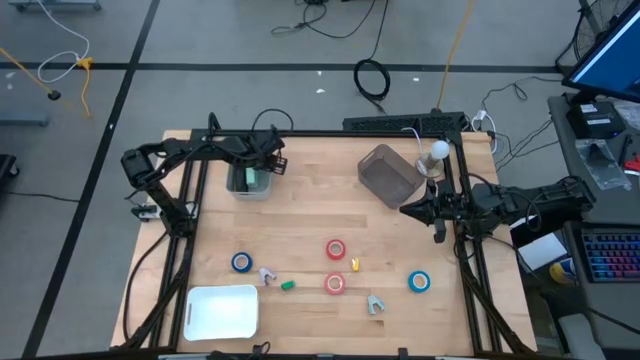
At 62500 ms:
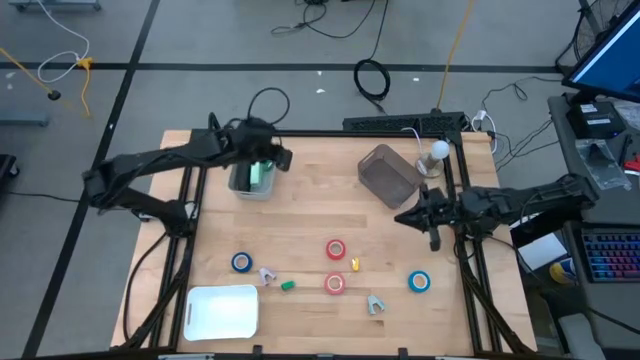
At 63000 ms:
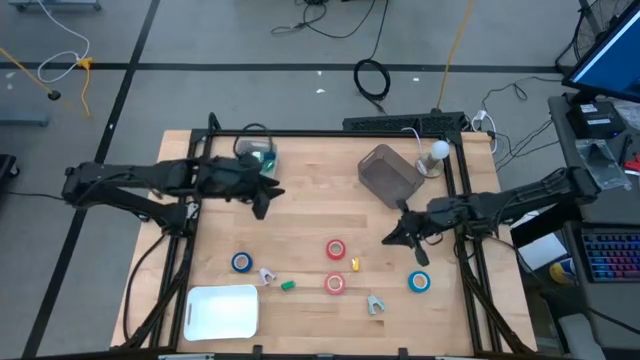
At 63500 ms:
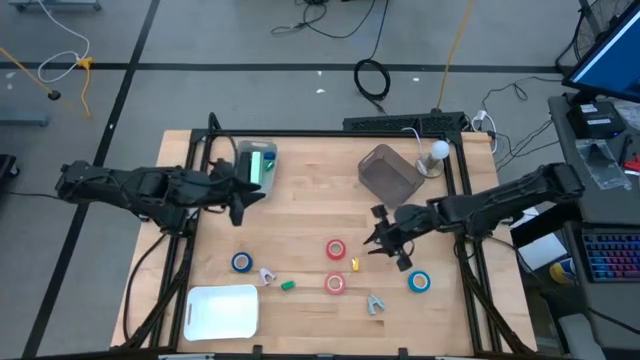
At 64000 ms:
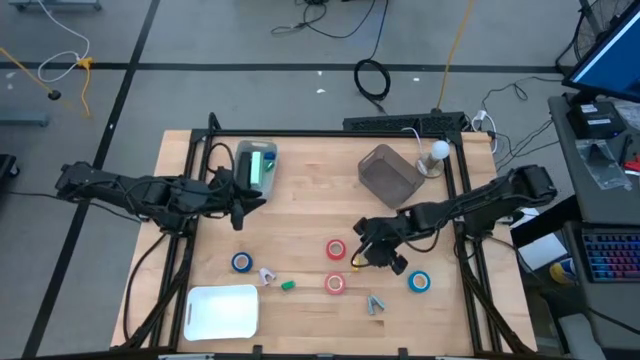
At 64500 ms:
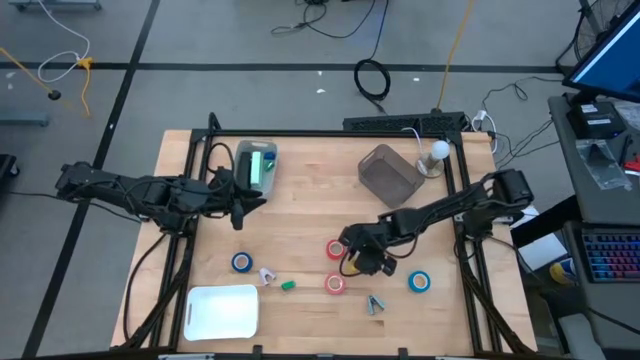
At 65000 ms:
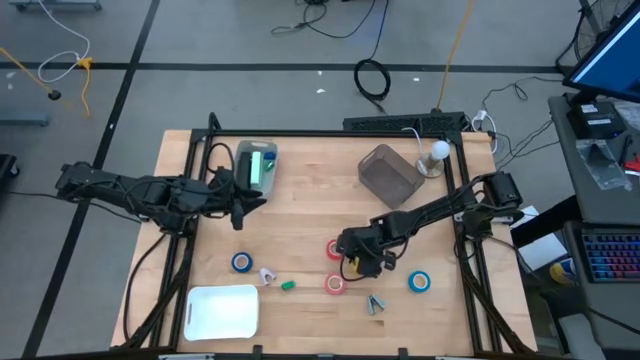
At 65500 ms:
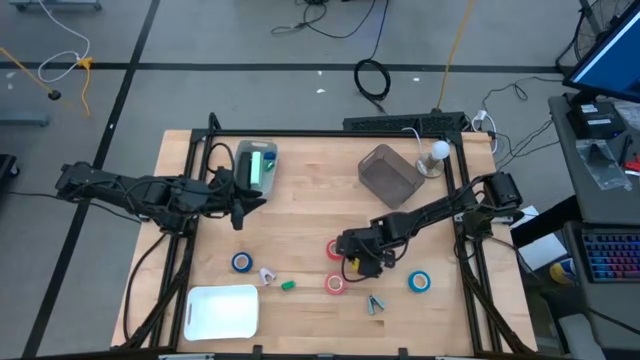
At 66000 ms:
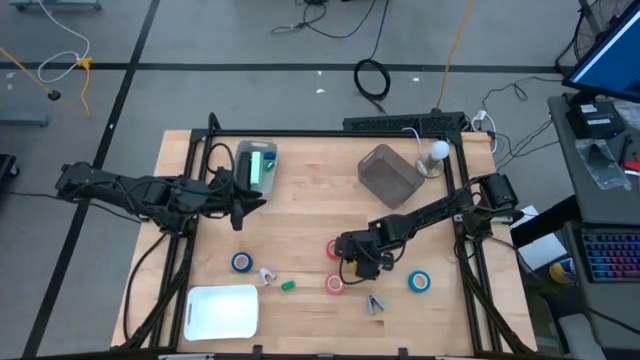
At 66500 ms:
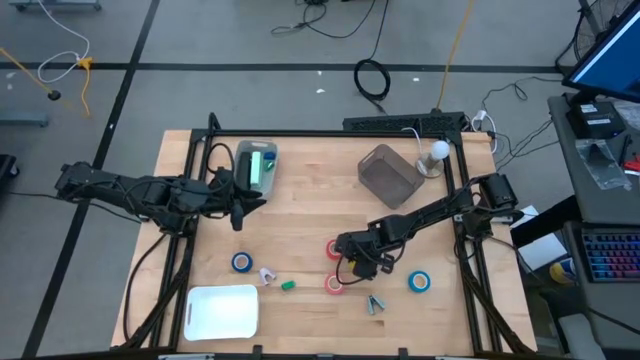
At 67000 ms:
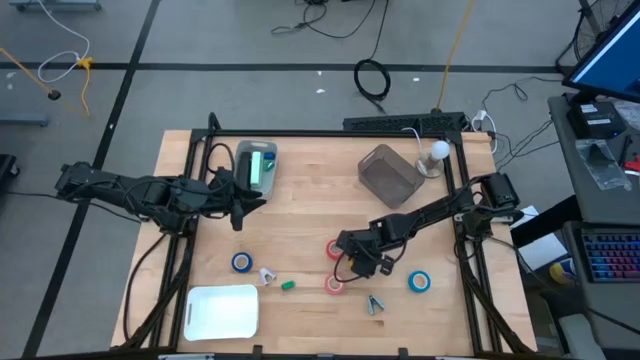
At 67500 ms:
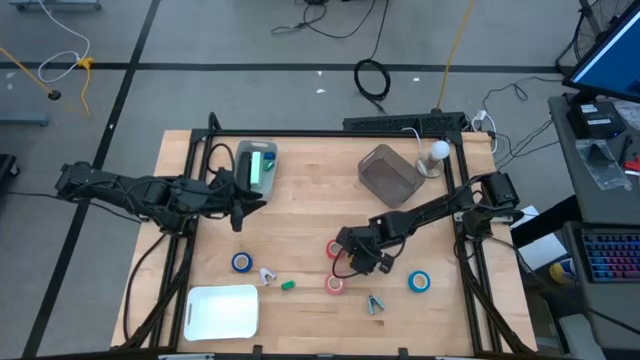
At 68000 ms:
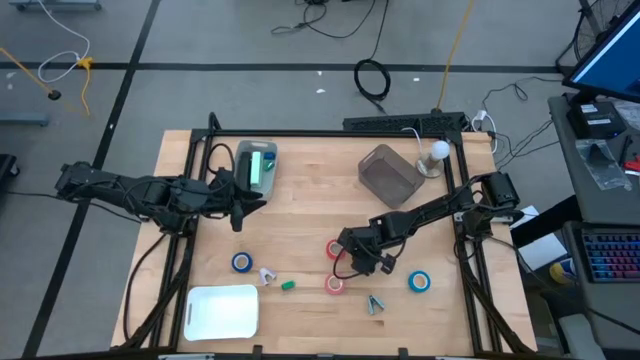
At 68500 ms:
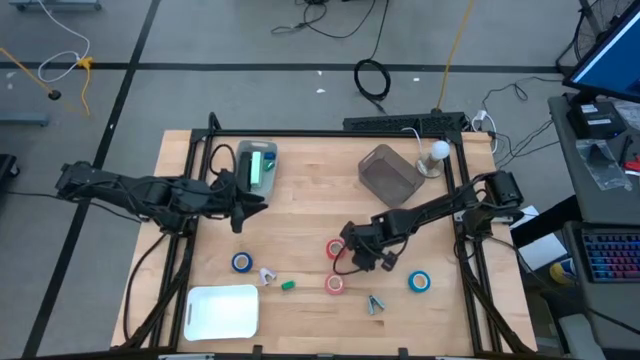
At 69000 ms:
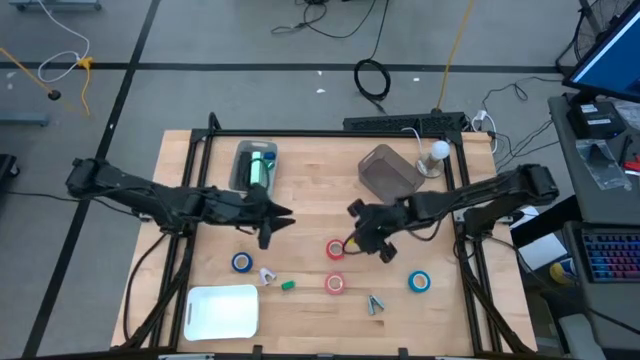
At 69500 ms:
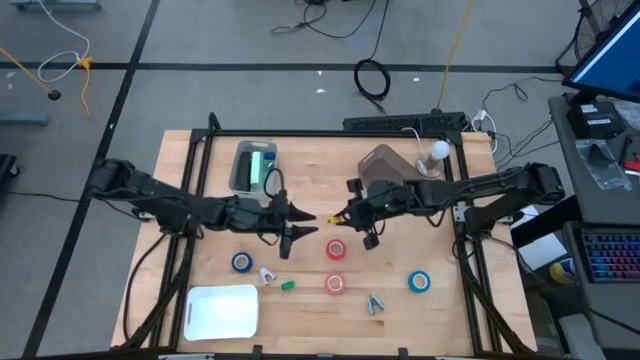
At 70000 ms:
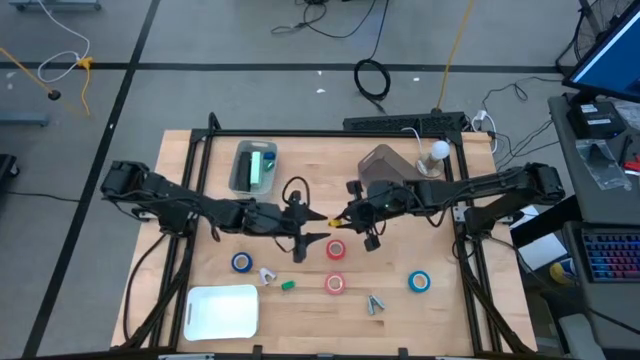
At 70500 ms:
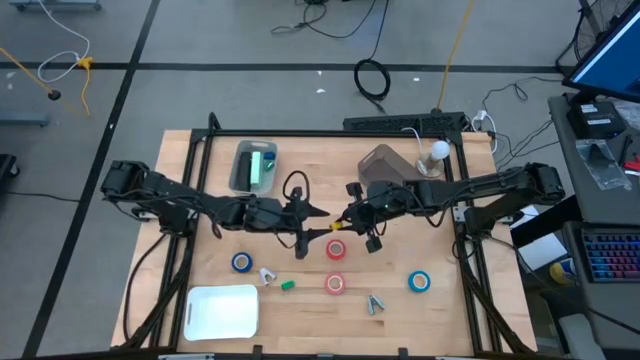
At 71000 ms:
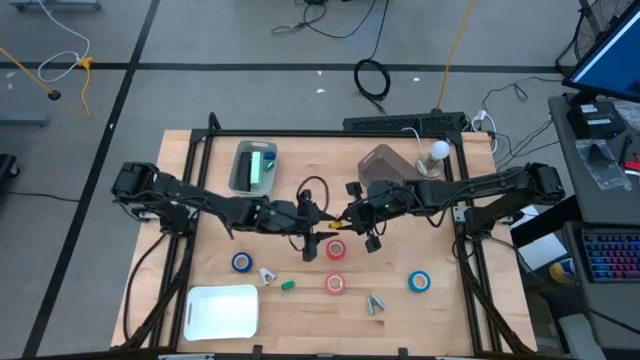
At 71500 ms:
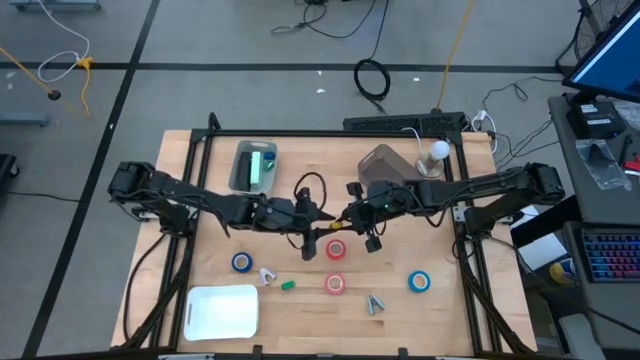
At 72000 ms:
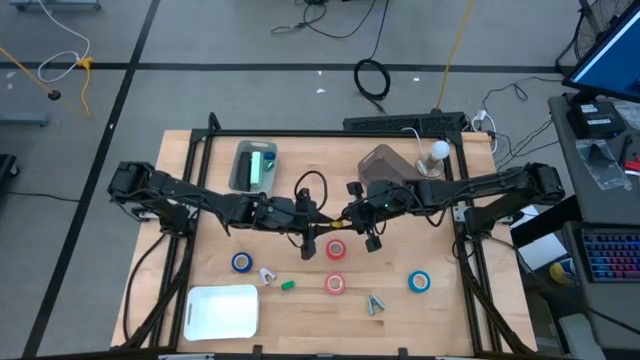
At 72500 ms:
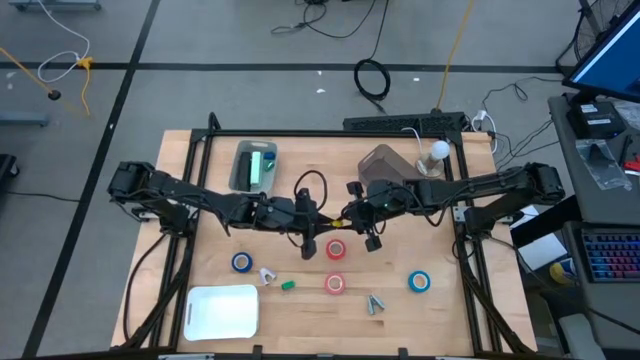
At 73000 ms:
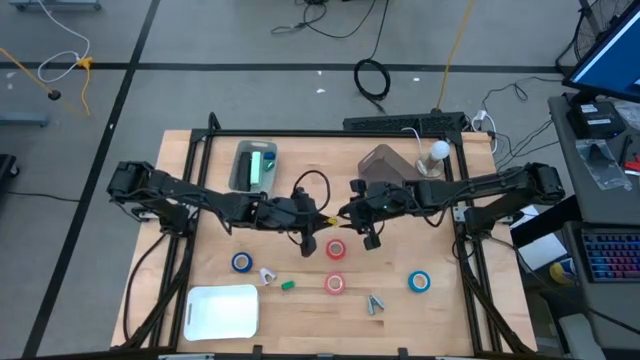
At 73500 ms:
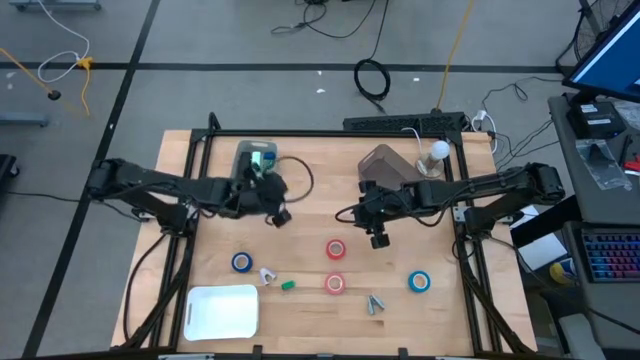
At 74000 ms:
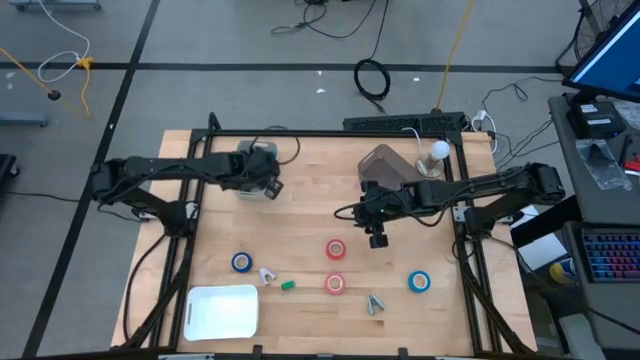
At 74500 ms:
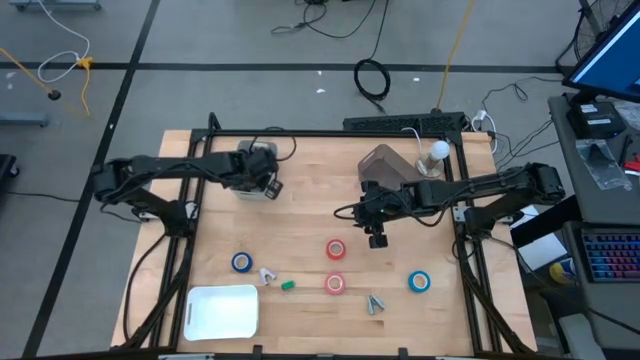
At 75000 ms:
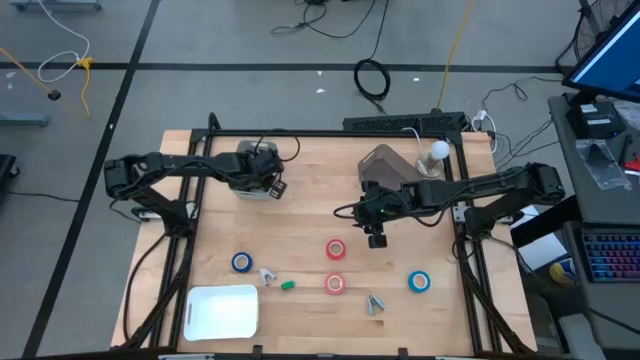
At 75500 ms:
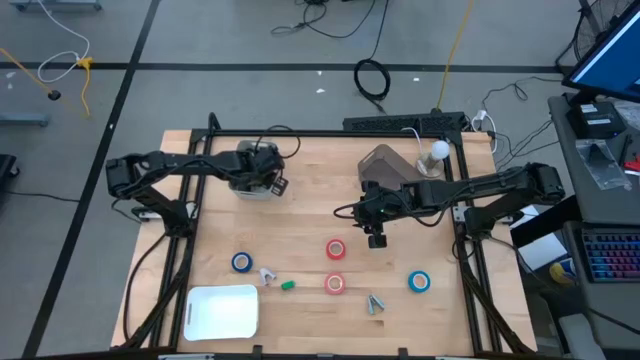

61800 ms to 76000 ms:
Task: Pick and place Stapler, Stapler remover, tape
Put the yellow staple into the gray bin

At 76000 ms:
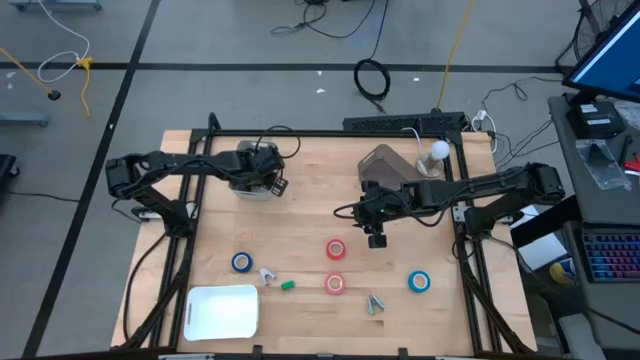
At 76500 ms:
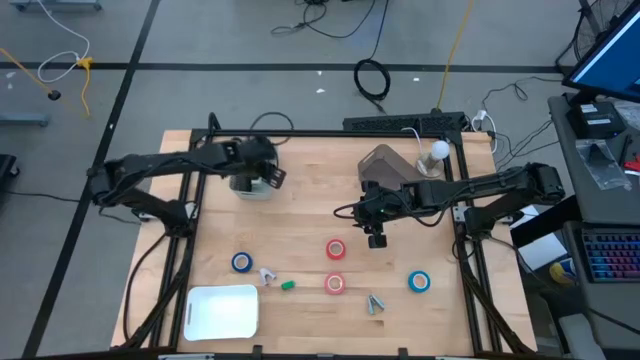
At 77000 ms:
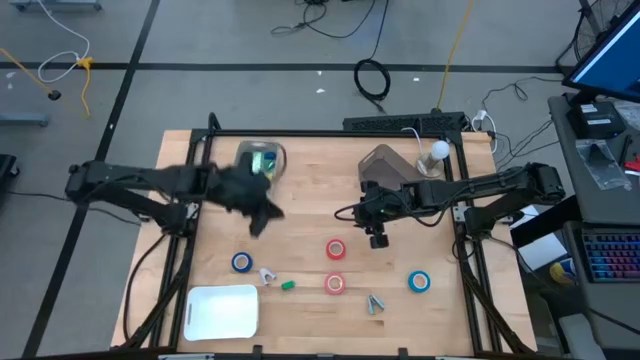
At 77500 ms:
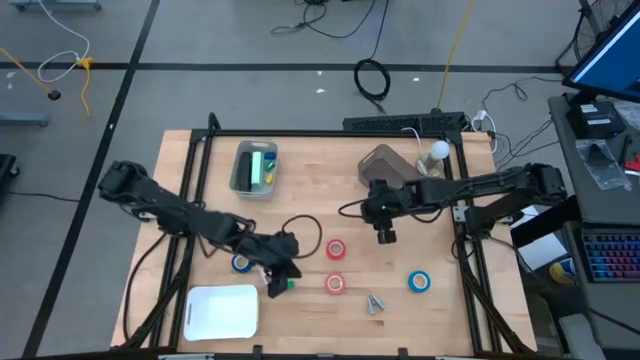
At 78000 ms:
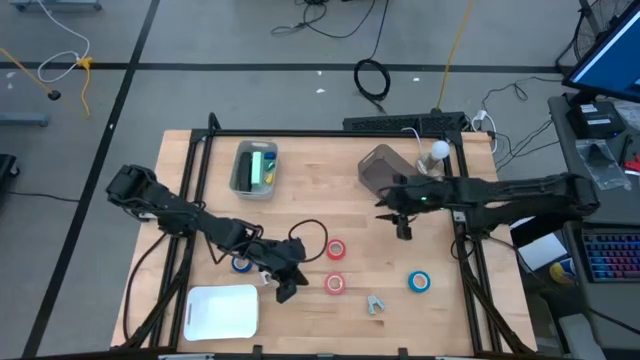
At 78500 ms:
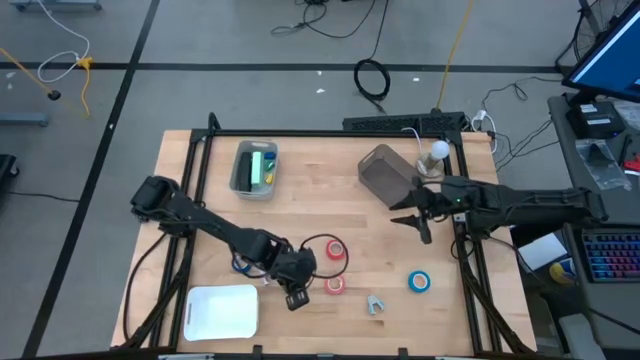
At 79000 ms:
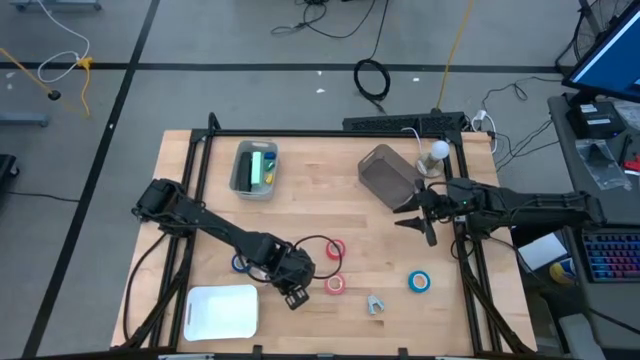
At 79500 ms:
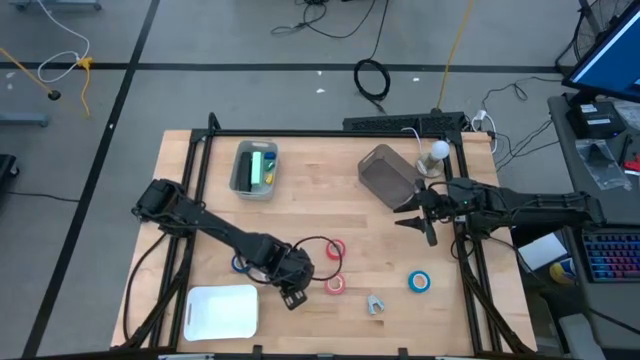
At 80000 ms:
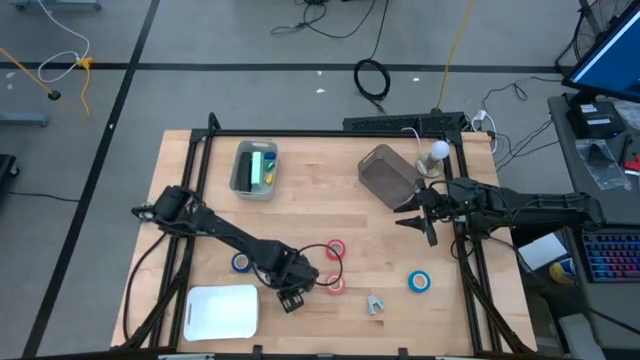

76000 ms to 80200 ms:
Put the green stapler into the gray bin

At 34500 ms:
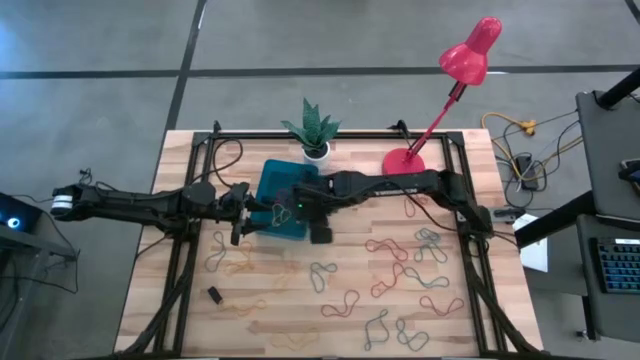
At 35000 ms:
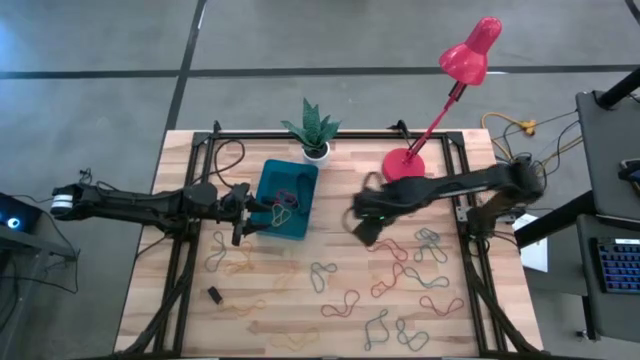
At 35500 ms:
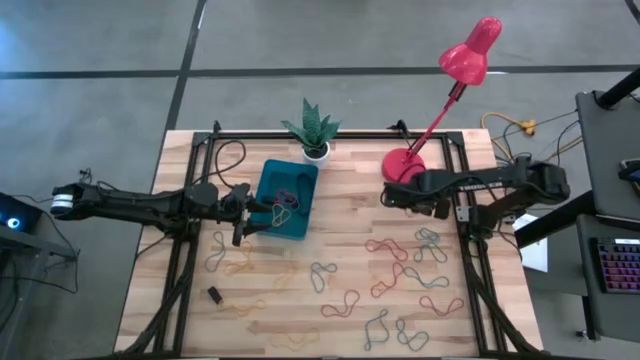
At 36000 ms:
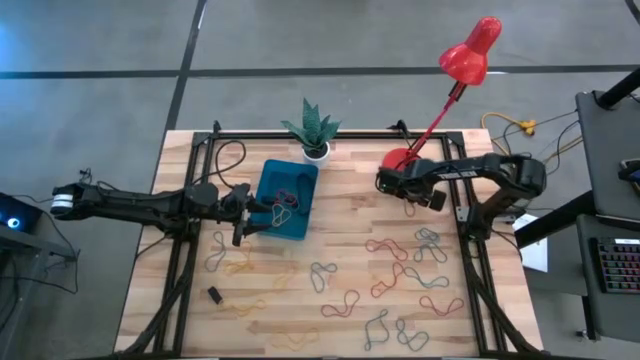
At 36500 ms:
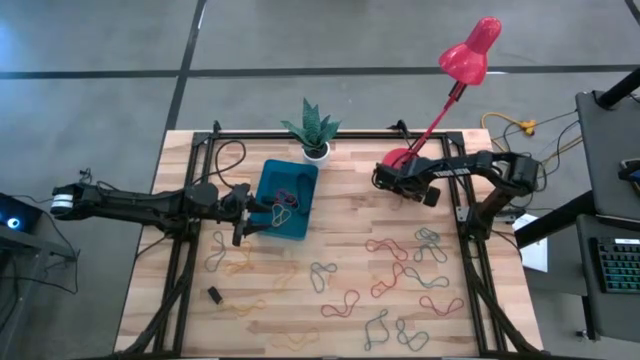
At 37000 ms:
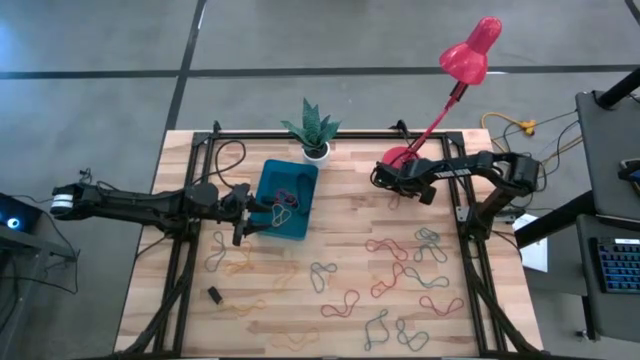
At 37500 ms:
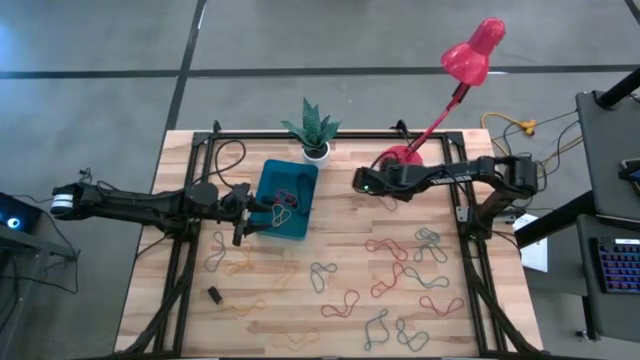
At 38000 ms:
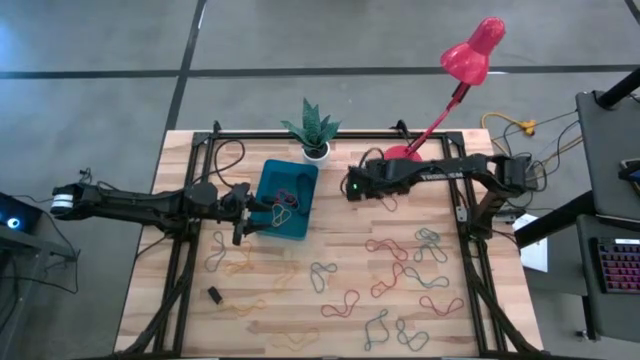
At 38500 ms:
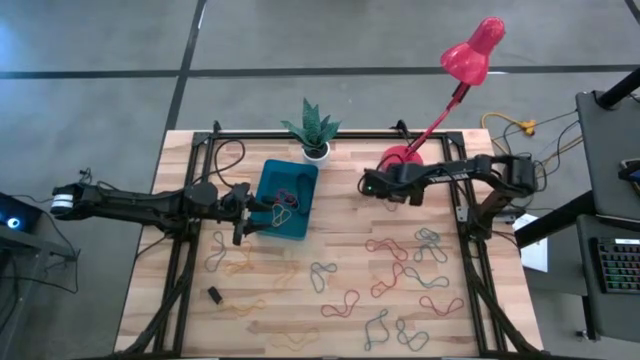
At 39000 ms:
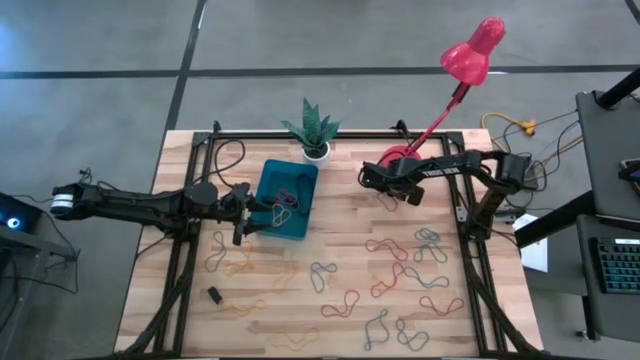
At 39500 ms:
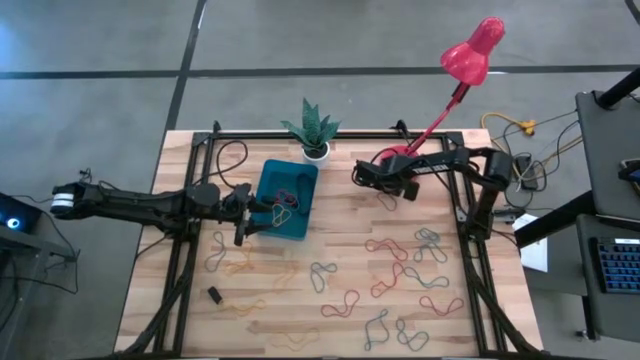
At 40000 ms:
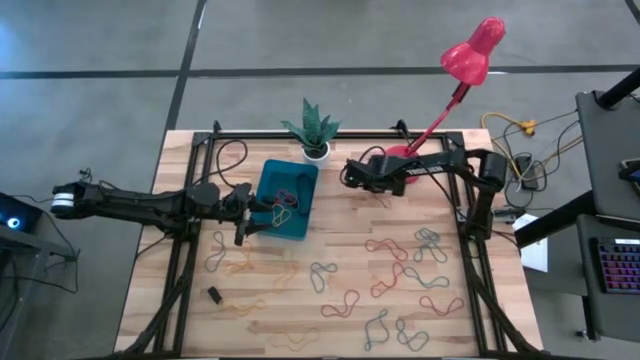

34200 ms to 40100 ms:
Task: Pick and place rubber bands into bin
Put the orange rubber band into the blue bin
